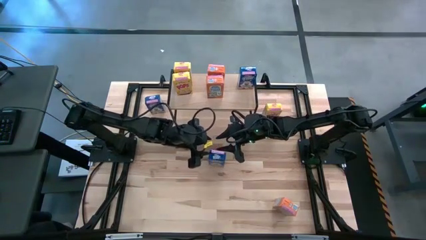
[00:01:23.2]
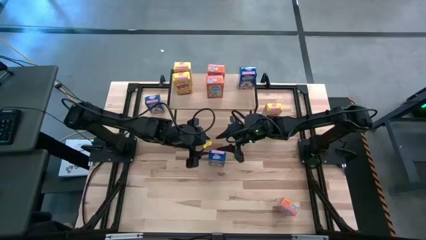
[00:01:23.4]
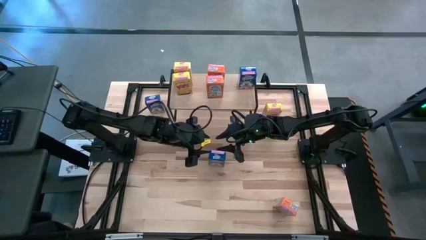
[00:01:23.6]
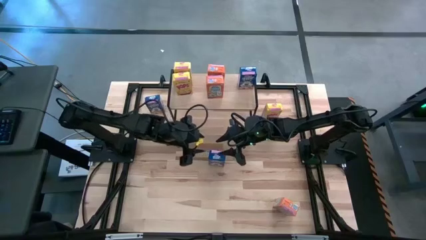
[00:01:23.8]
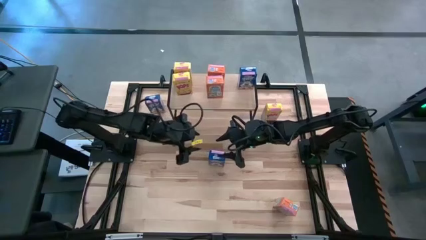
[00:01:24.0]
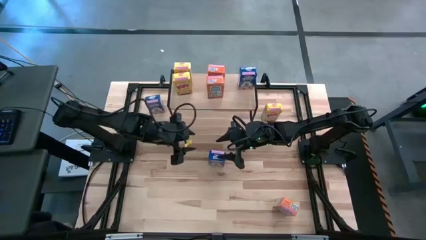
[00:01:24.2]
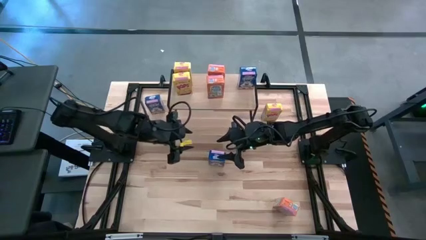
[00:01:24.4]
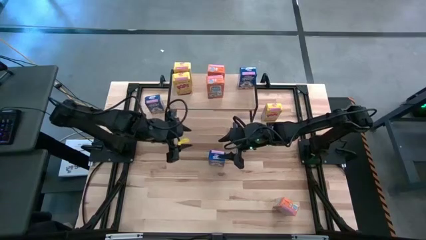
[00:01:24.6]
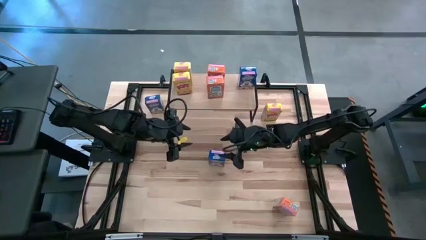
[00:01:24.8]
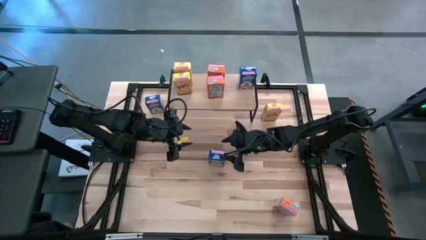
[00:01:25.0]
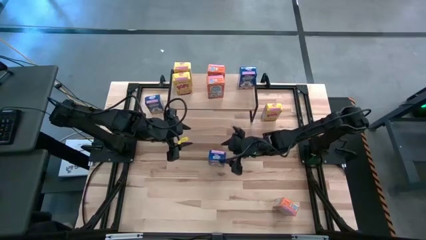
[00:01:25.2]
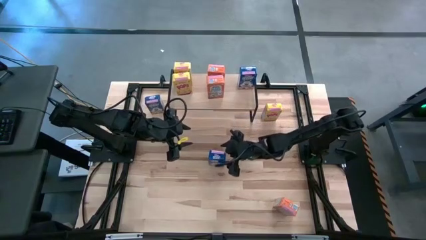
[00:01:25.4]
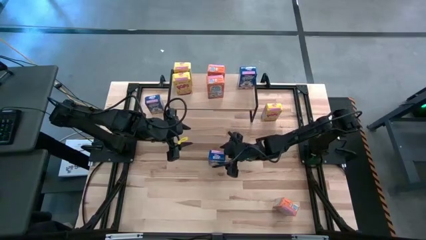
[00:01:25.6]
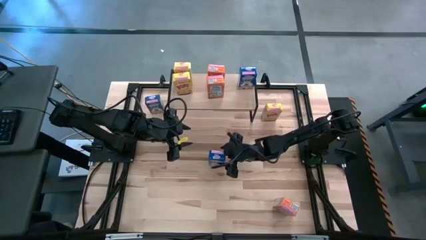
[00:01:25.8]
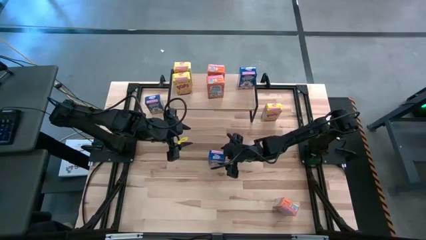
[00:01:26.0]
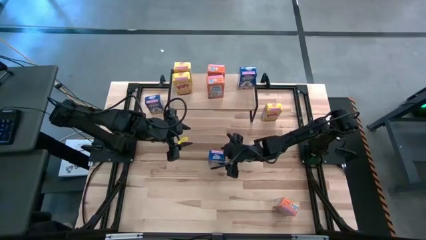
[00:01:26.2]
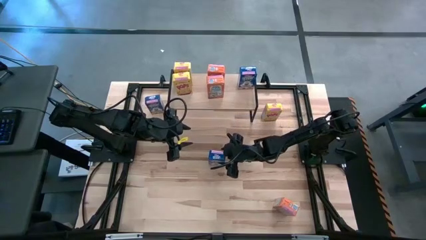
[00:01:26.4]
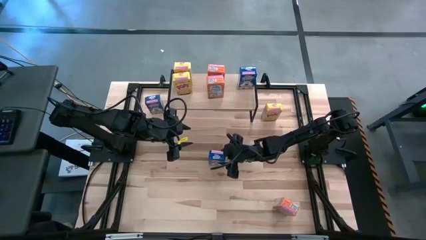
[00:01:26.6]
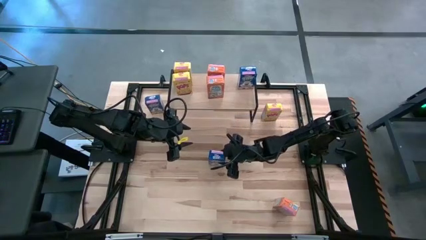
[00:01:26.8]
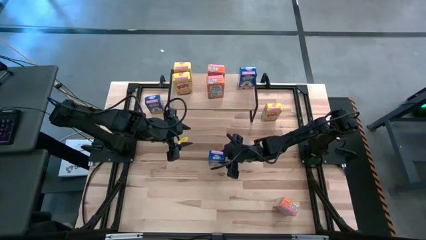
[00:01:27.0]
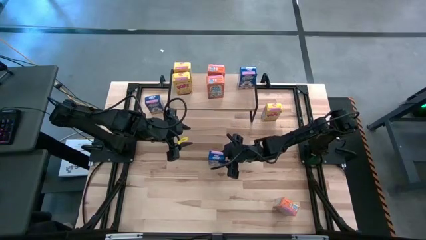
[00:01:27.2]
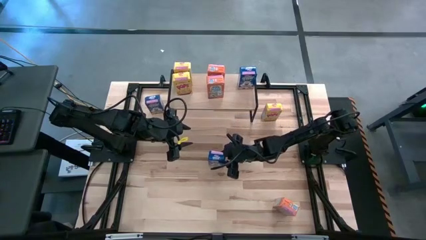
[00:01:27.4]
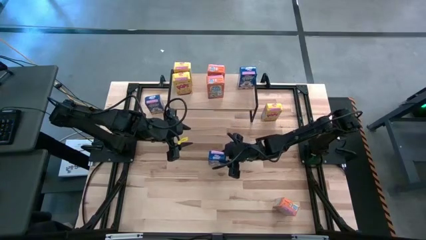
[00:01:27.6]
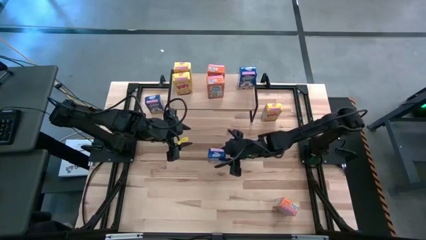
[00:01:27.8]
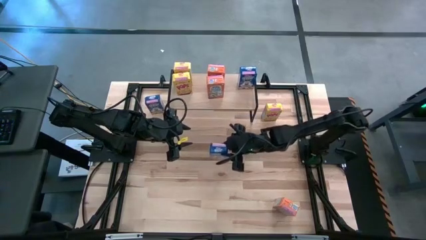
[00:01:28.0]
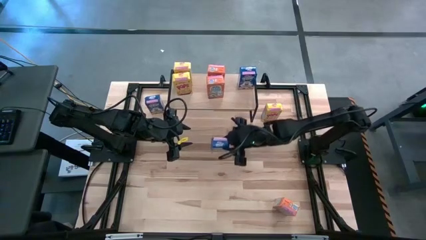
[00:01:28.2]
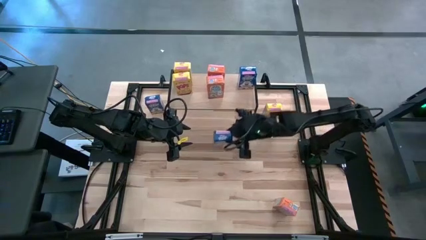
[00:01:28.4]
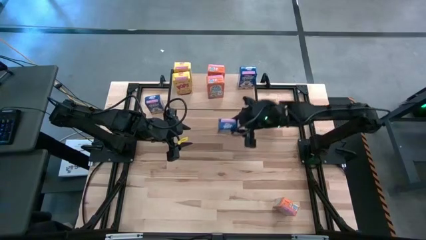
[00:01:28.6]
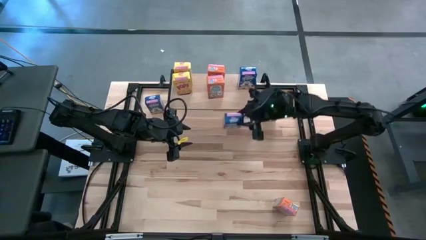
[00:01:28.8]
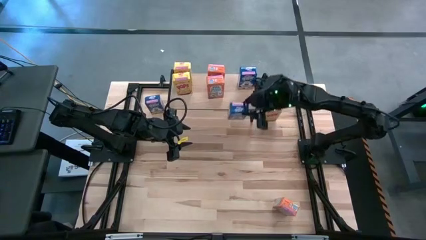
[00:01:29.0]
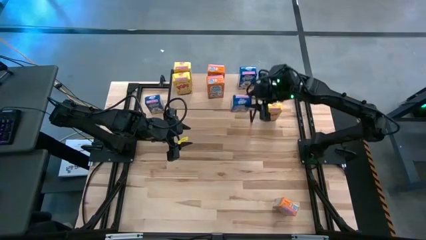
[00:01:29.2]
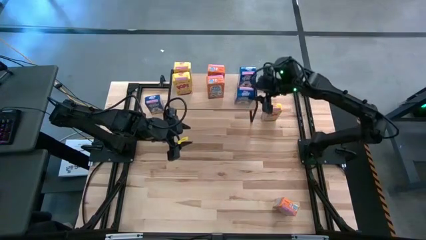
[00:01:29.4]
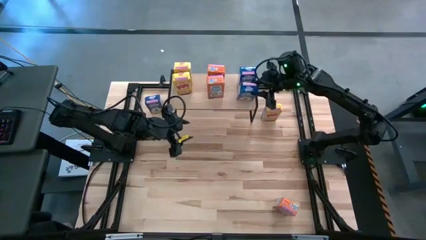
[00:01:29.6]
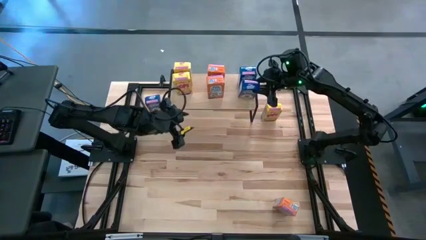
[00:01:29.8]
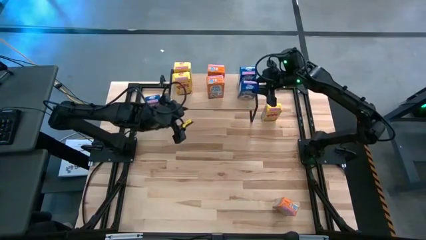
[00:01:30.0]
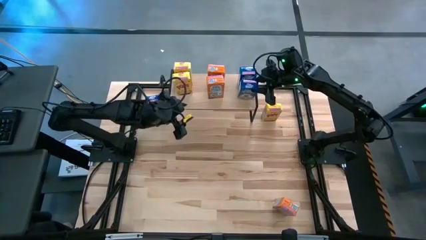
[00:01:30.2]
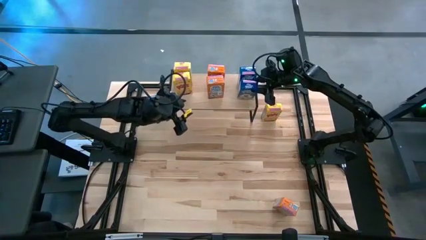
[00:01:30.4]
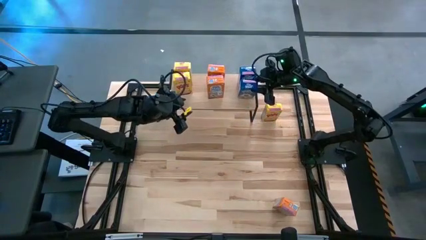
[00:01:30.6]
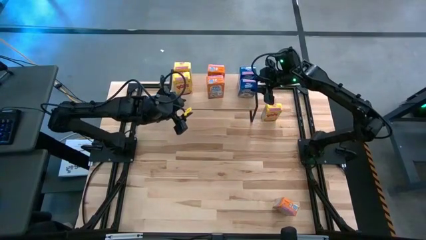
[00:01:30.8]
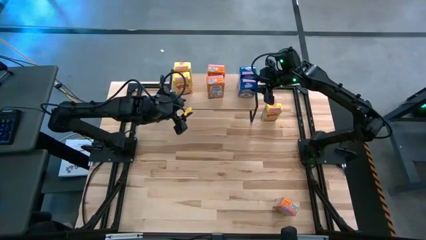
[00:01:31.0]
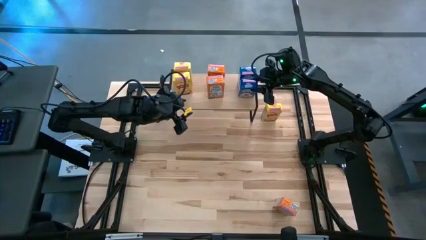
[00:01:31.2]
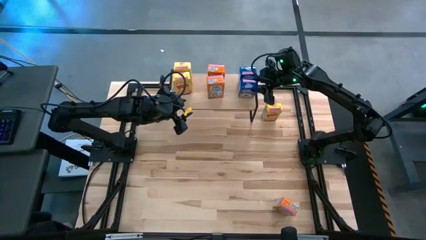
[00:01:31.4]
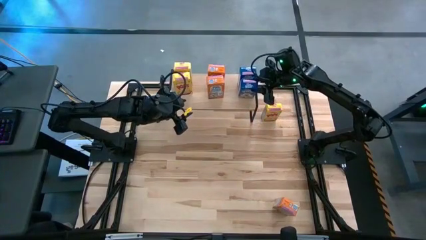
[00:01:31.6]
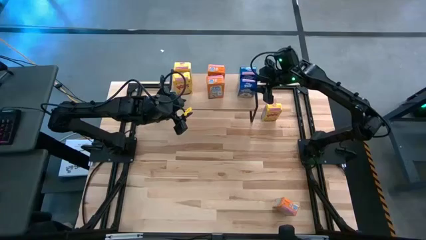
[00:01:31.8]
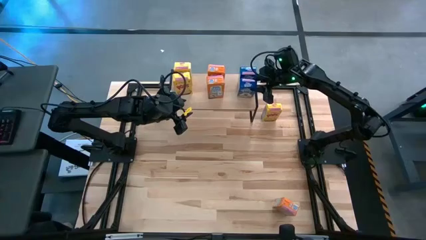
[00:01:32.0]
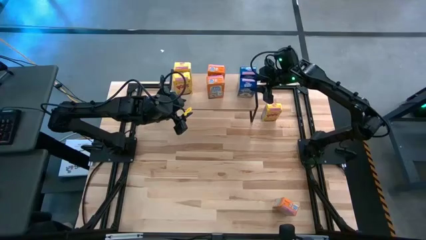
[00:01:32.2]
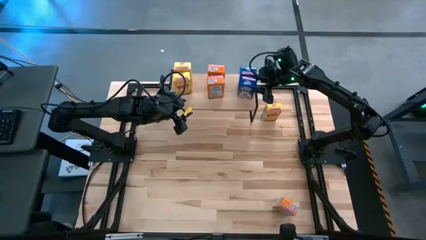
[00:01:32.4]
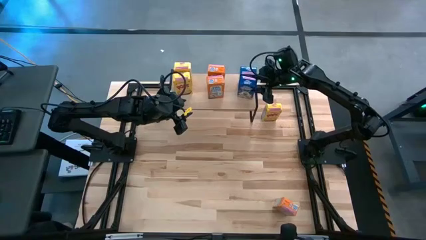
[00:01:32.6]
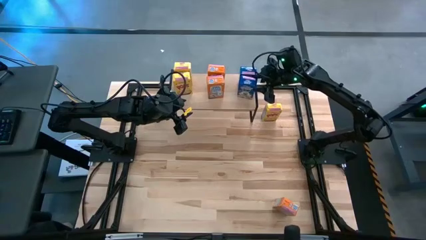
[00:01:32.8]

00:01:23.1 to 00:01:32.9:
Task: Stack cereal on shelf
Put the bottom blue cereal box on the shelf aligned with the other blue cereal box
